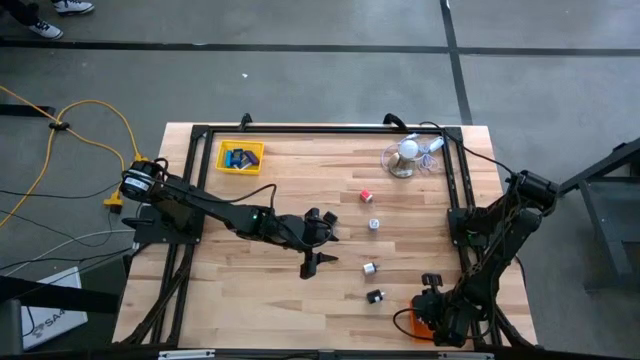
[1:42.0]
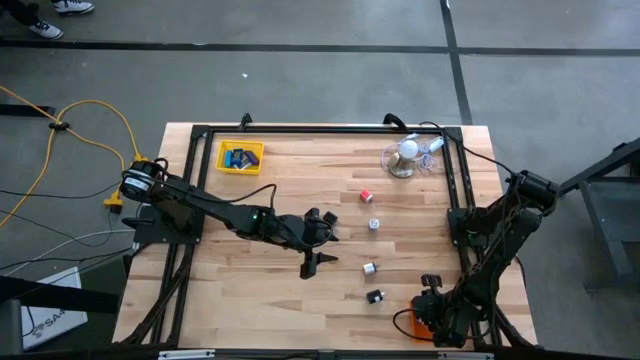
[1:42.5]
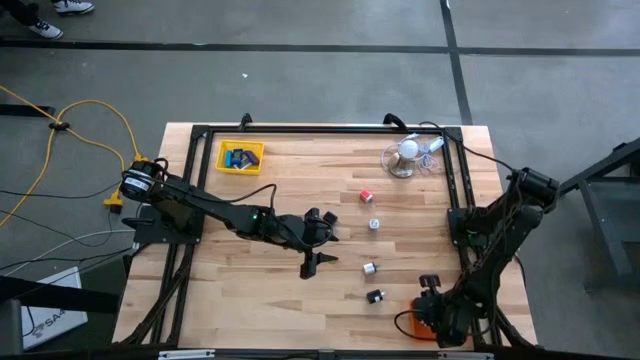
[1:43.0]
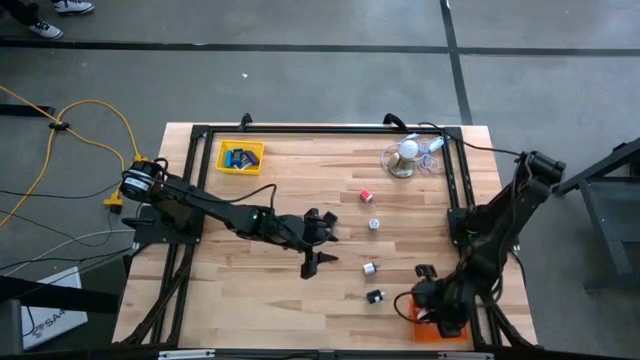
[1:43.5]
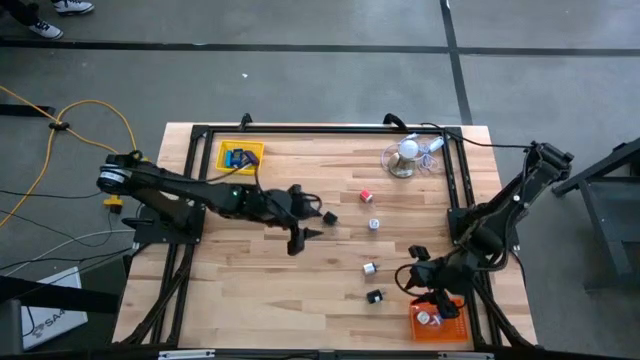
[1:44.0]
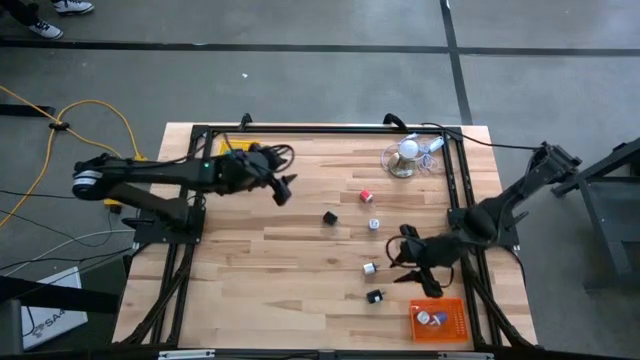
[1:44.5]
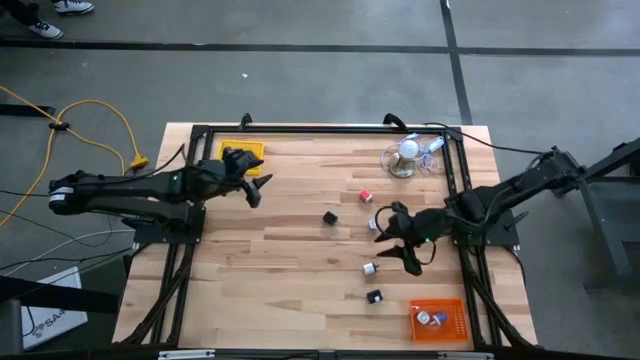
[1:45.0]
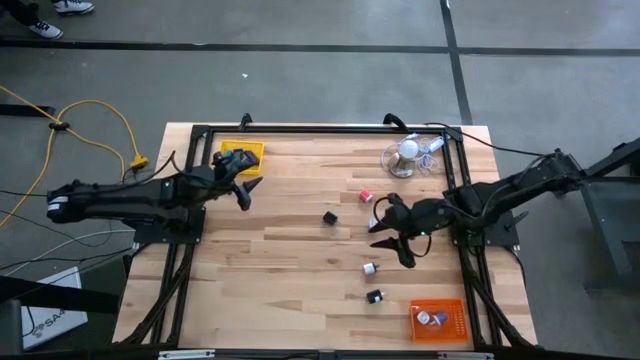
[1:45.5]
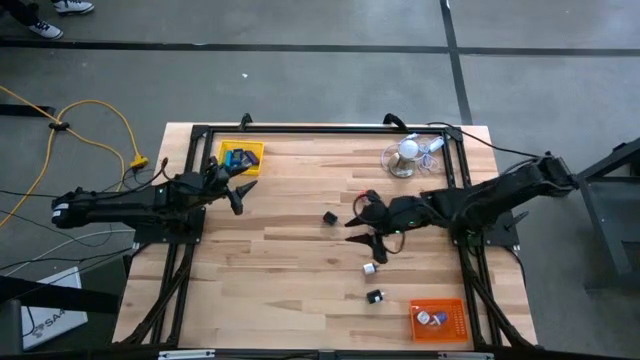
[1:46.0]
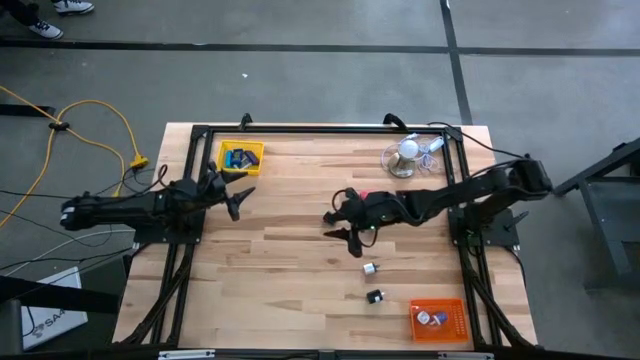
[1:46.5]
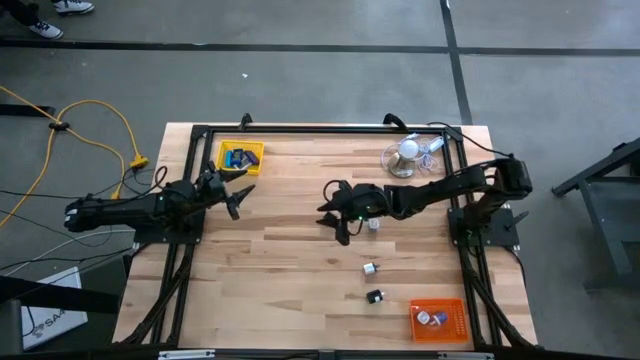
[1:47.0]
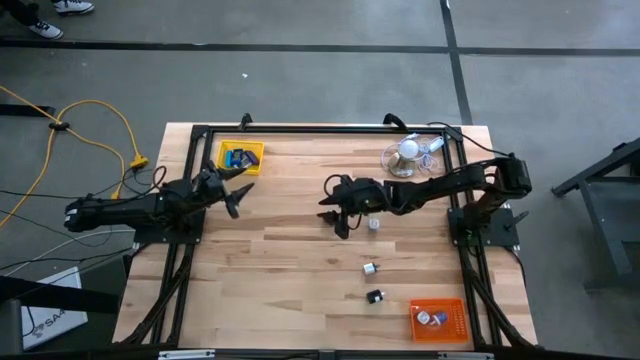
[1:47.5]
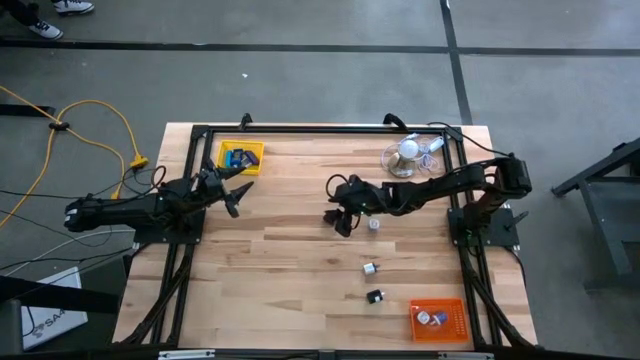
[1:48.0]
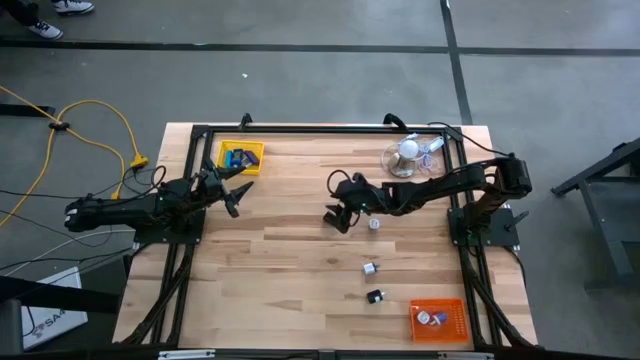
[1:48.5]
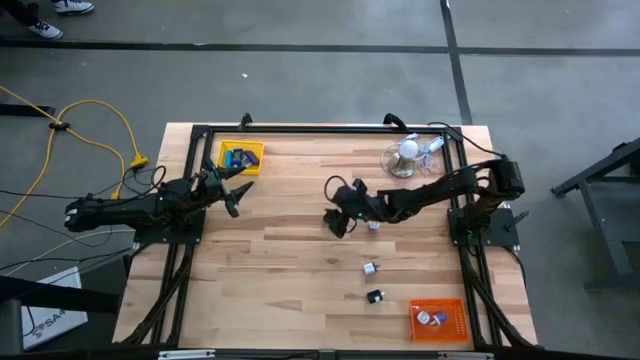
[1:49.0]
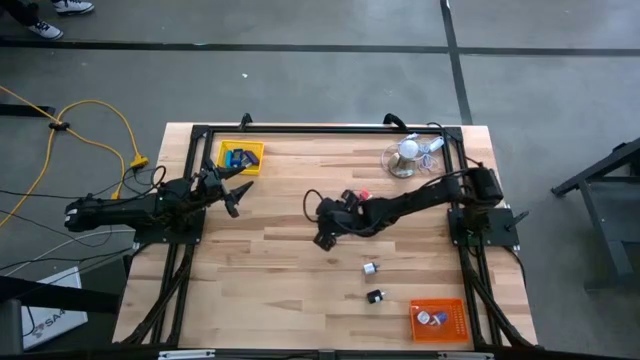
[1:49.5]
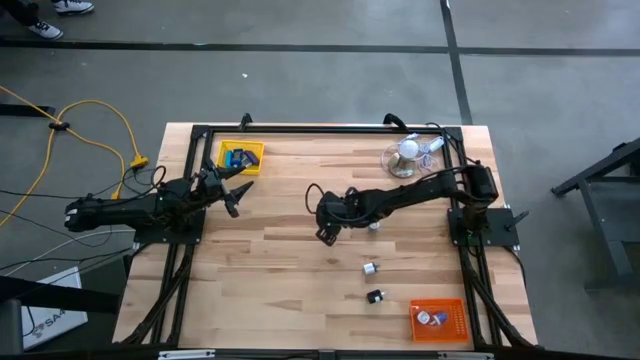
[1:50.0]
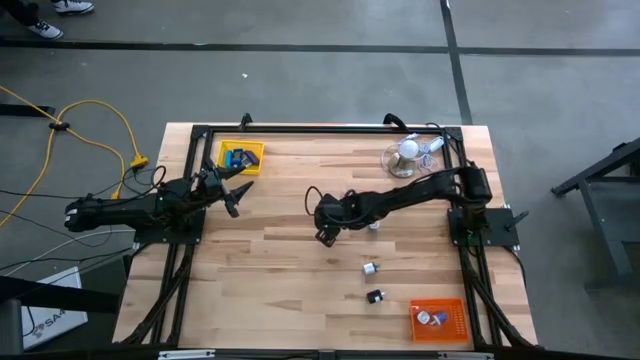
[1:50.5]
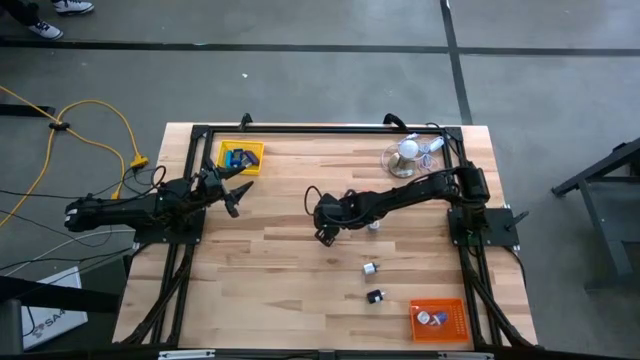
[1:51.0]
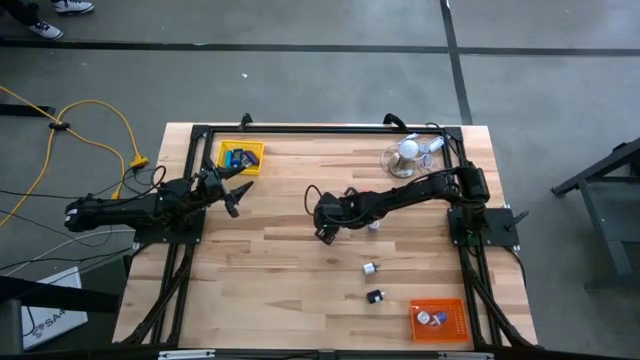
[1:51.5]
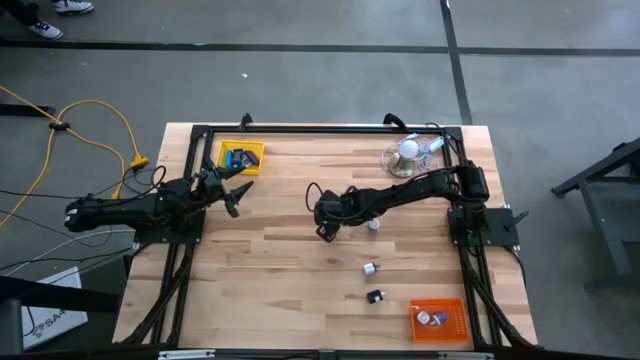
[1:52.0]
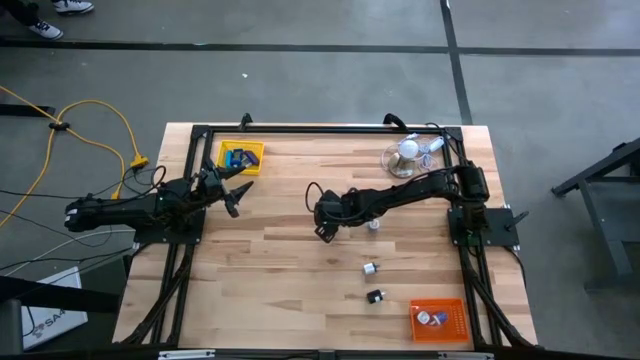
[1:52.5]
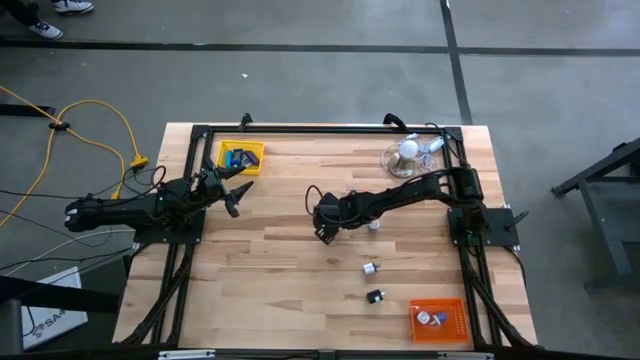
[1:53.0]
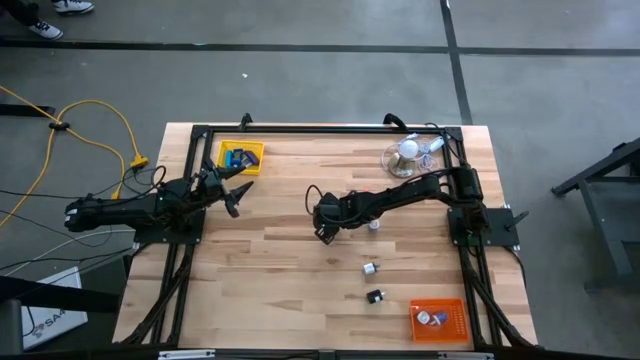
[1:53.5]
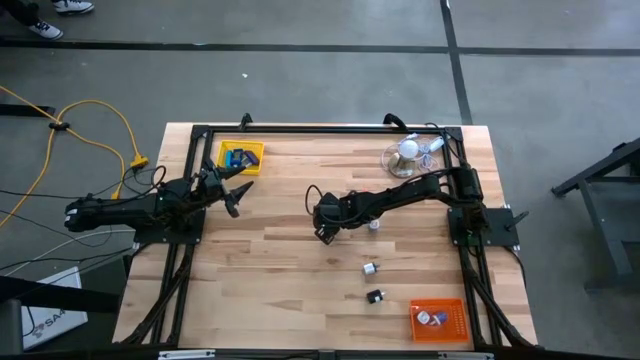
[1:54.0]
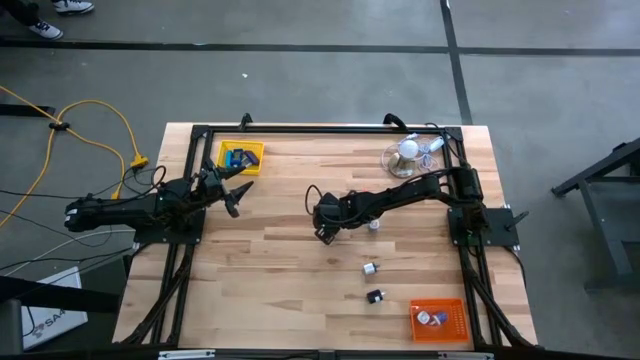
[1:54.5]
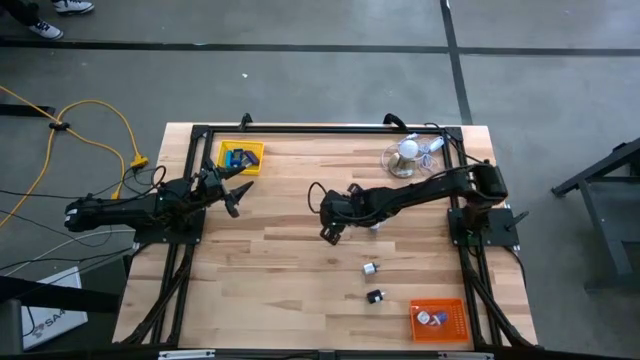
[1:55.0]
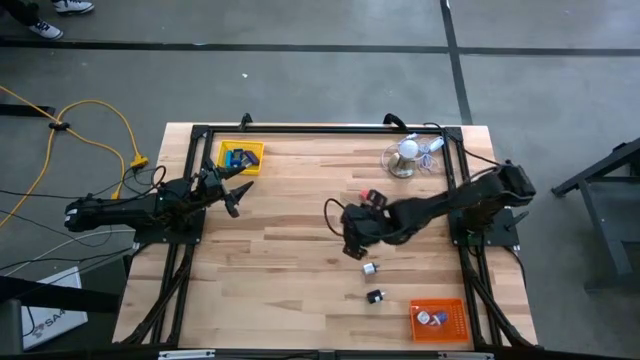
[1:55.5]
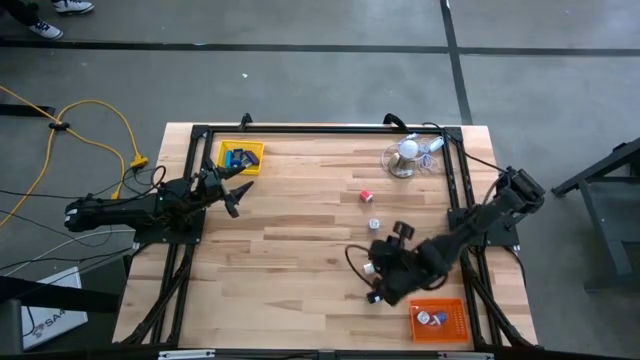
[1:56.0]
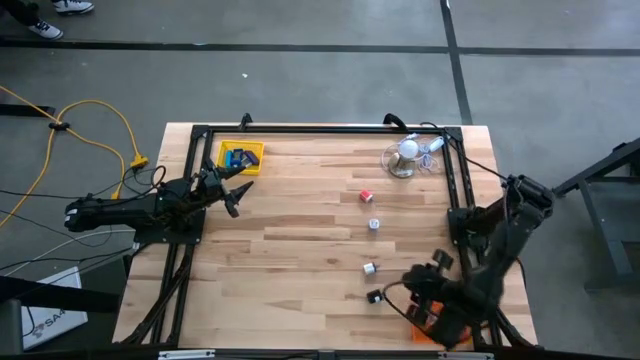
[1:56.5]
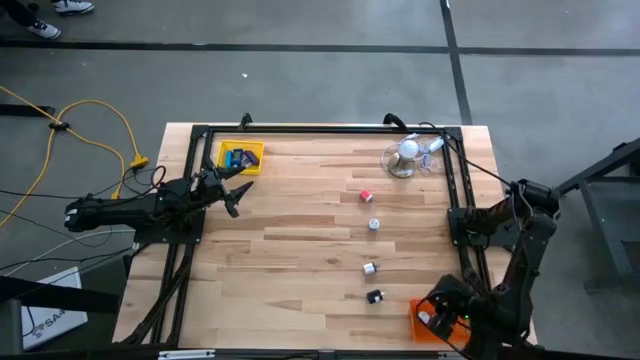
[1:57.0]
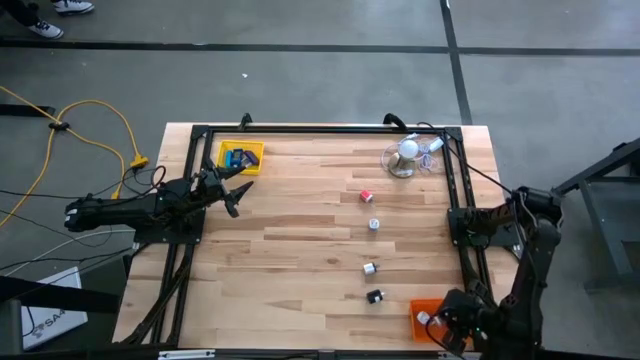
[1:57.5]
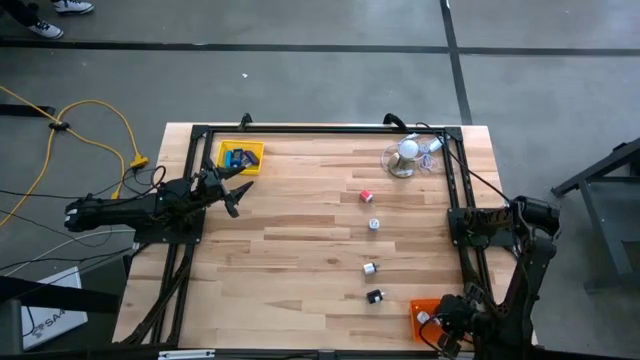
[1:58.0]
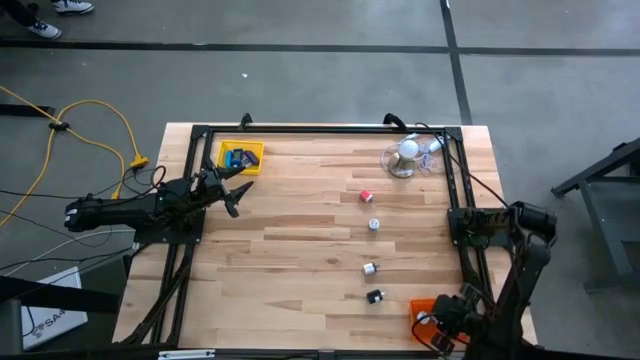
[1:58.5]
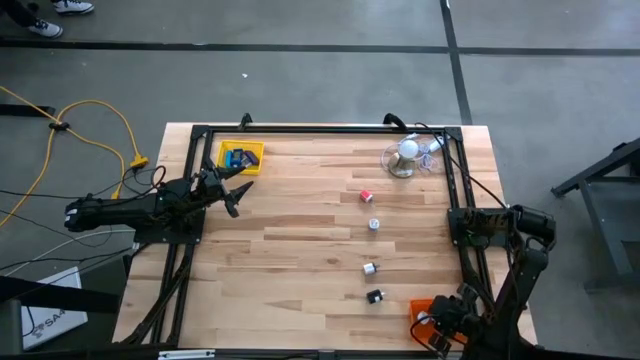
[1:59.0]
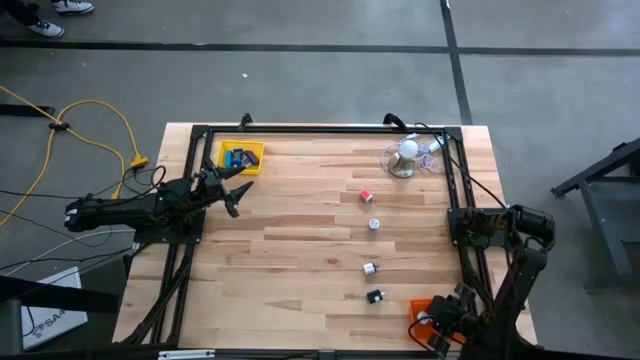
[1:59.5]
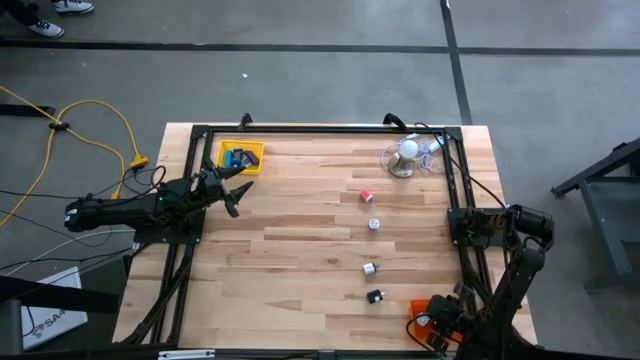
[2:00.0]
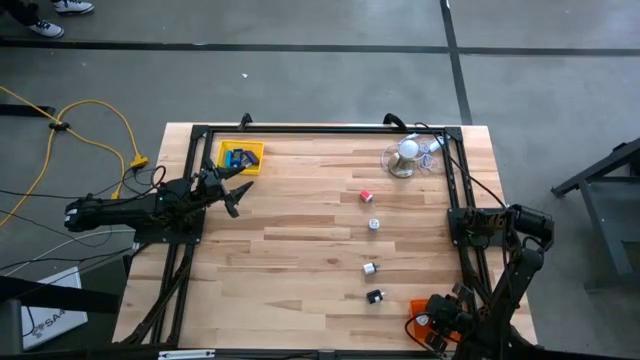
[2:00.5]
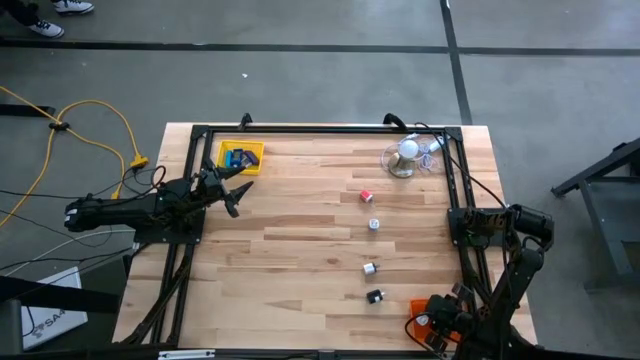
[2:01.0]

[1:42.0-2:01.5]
Task: Pick & Place Office items
Put the top black charger adapter into the orange bin
